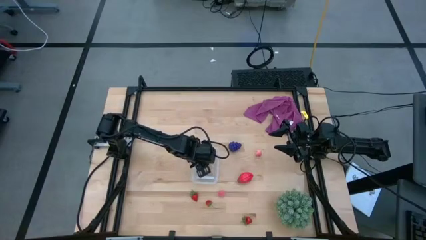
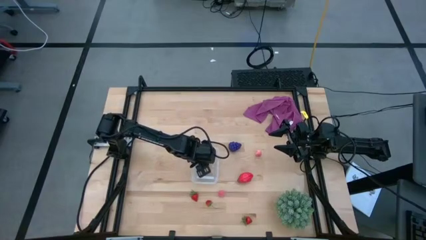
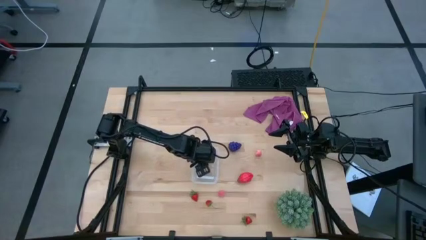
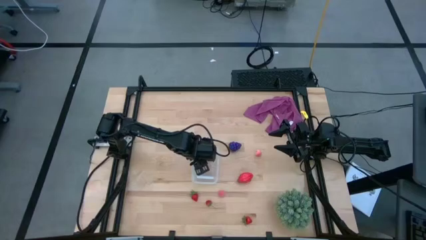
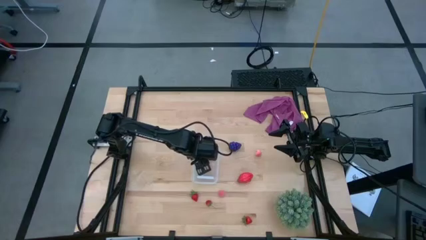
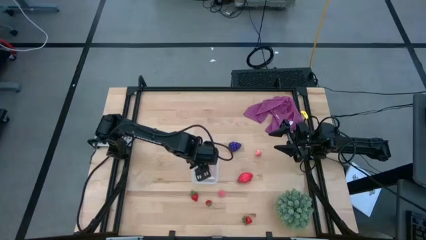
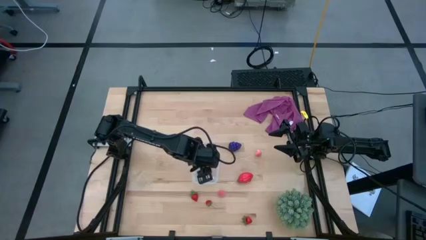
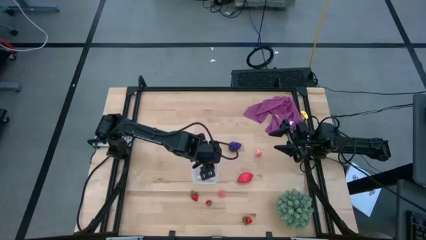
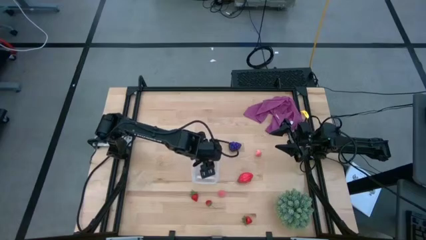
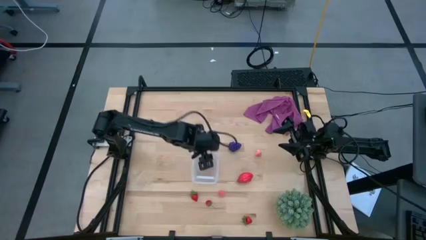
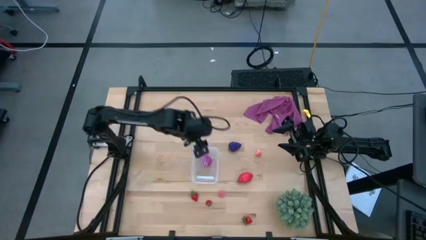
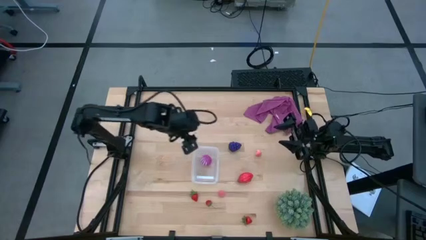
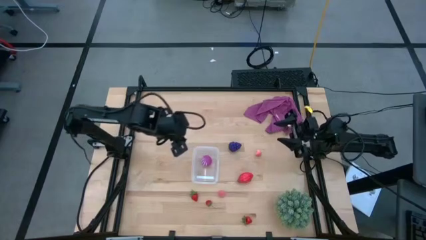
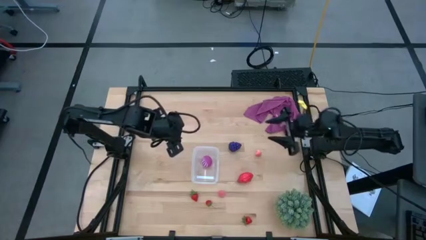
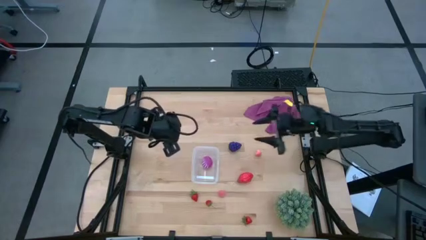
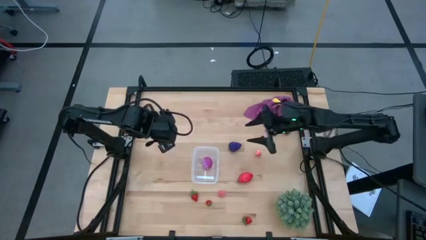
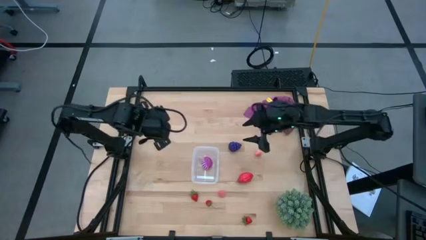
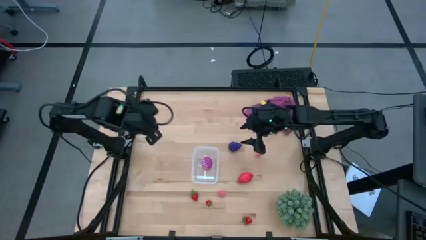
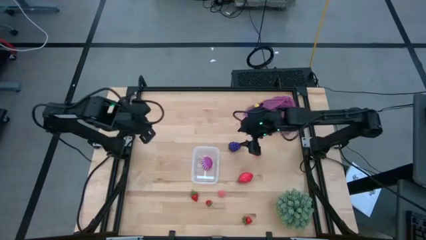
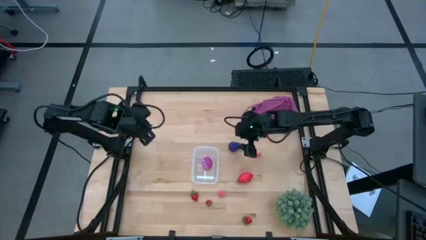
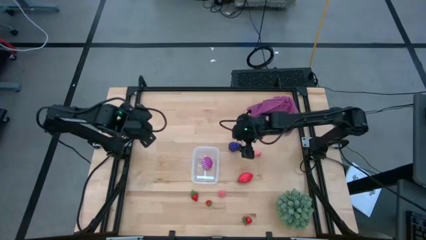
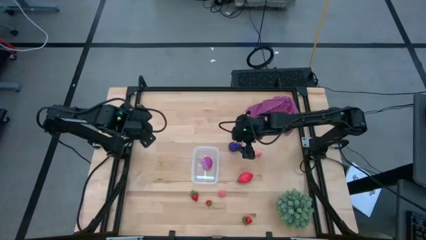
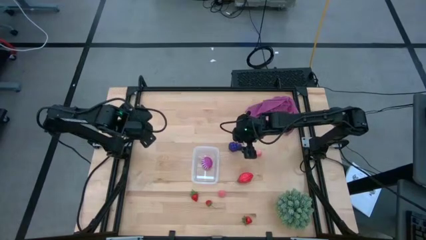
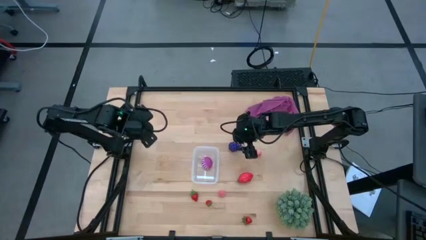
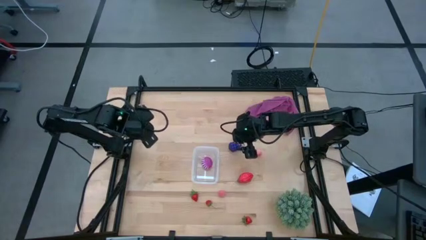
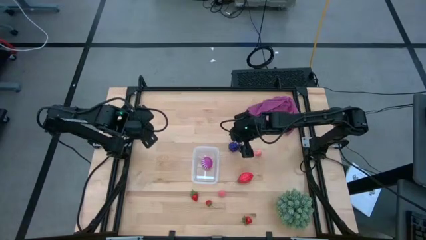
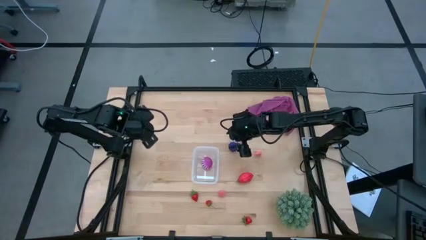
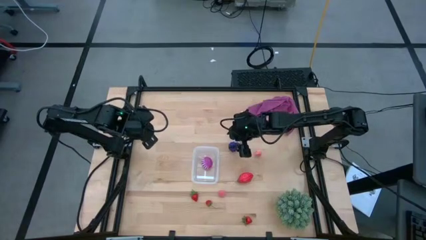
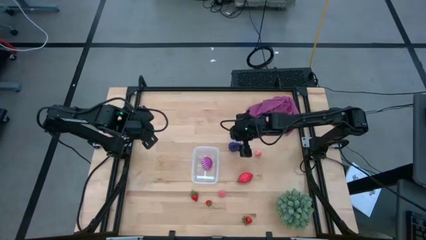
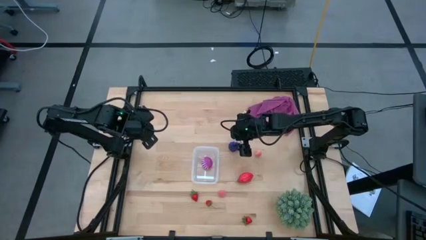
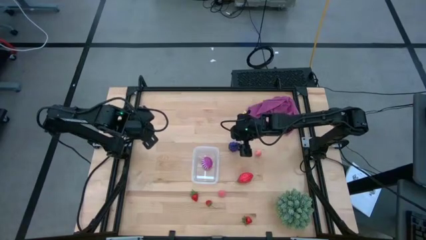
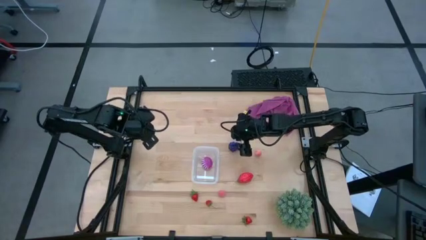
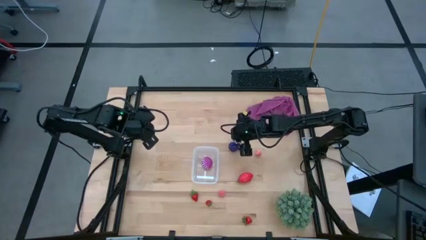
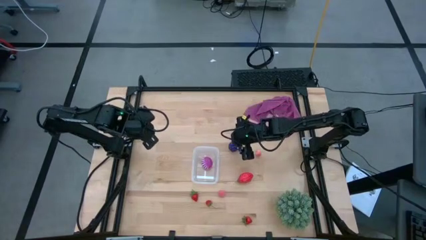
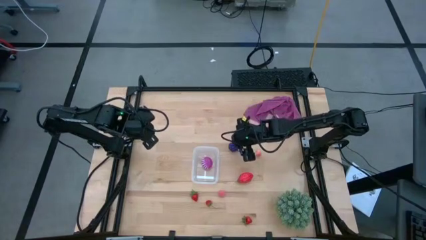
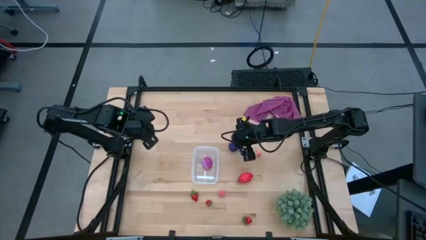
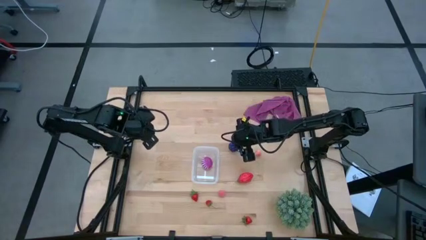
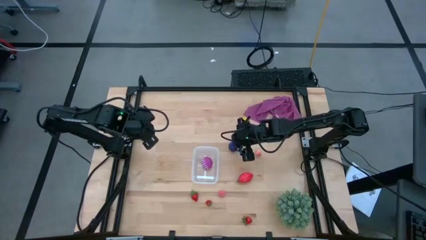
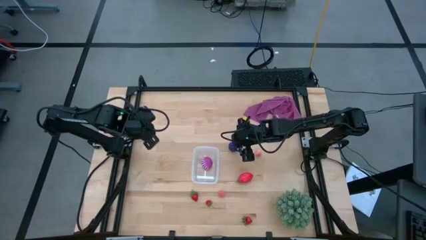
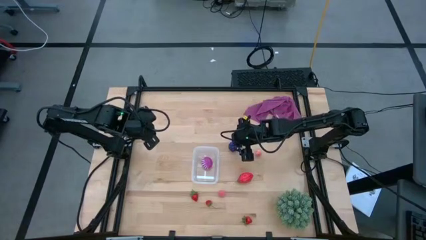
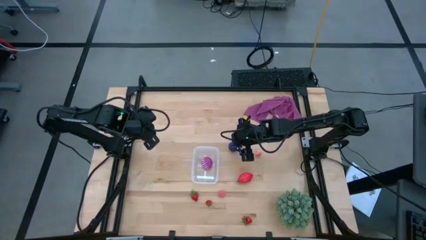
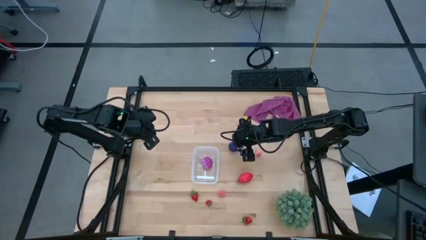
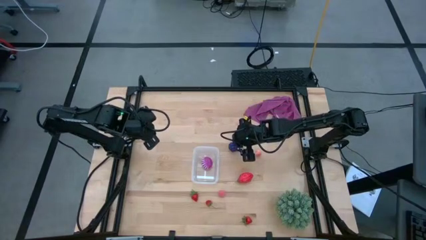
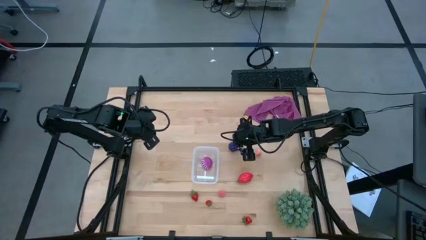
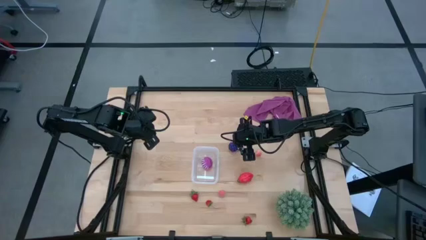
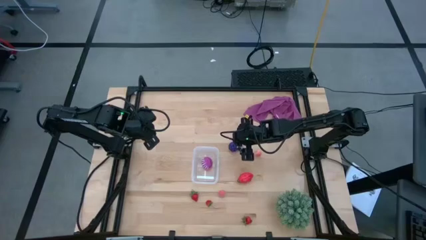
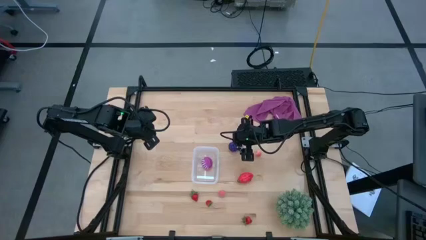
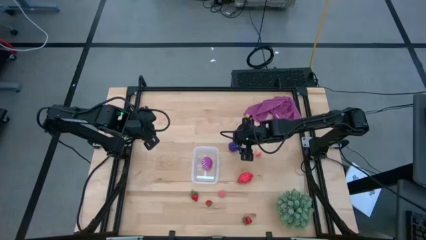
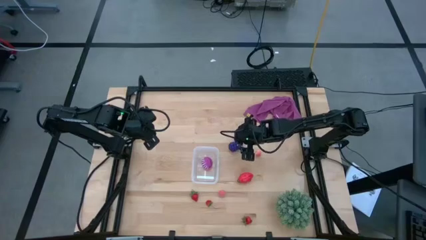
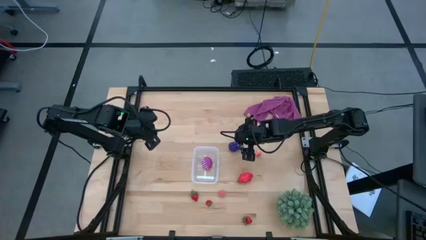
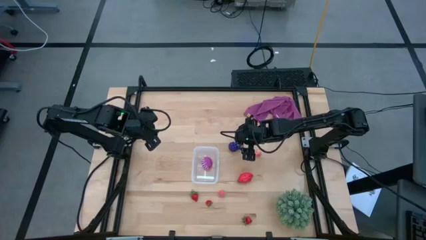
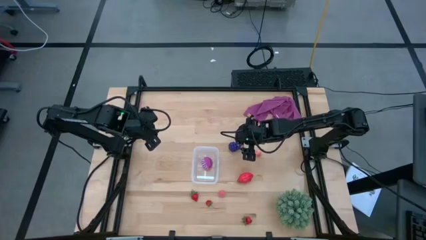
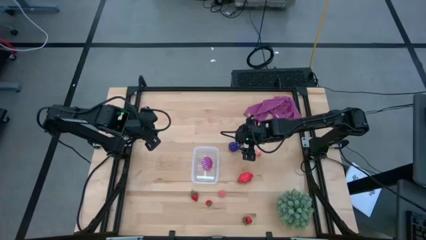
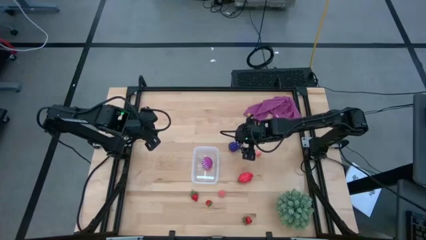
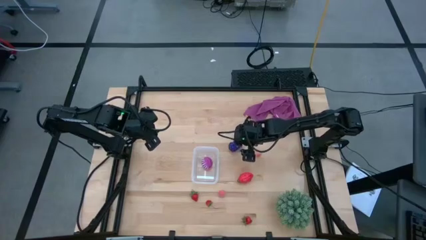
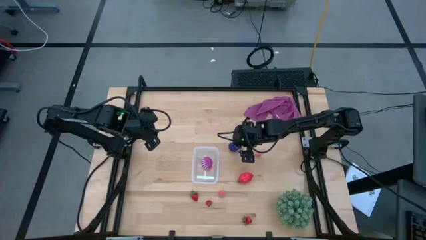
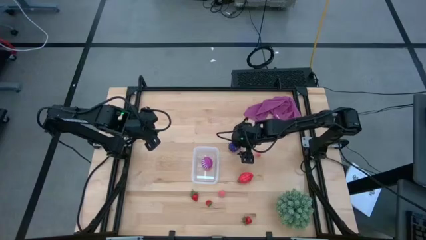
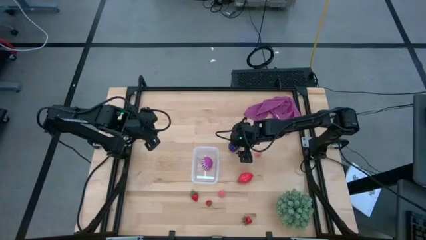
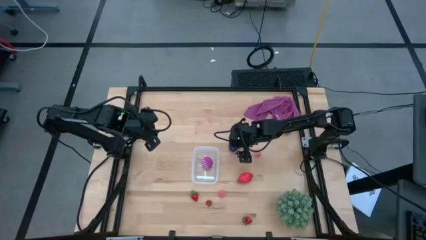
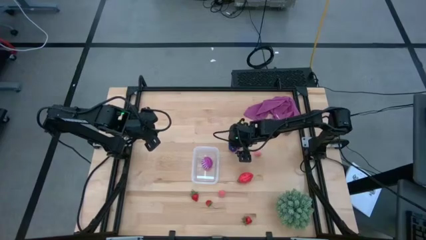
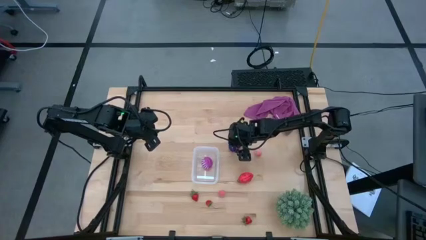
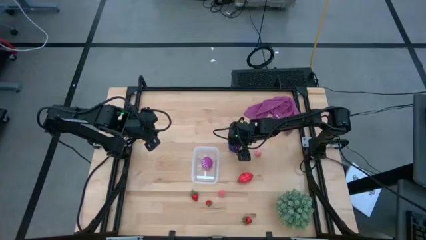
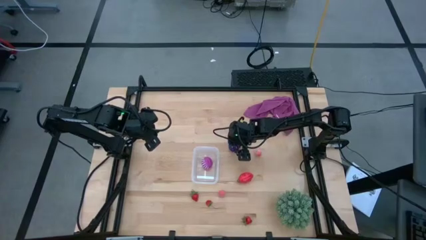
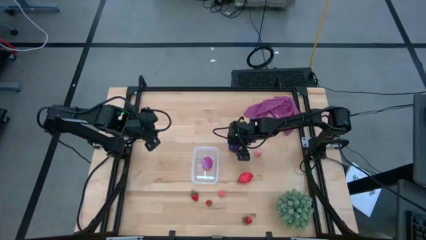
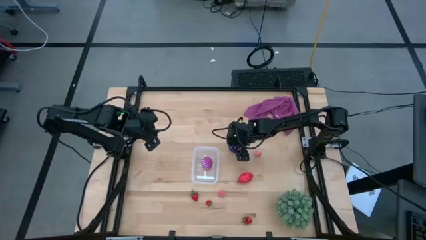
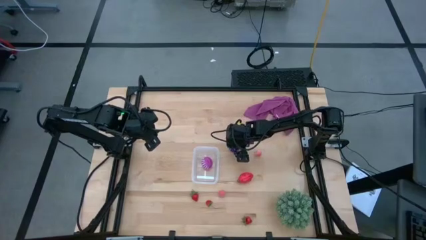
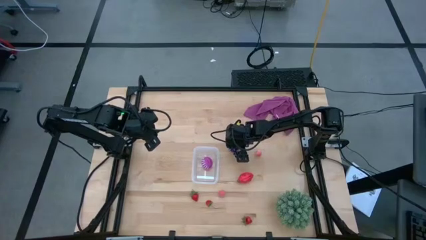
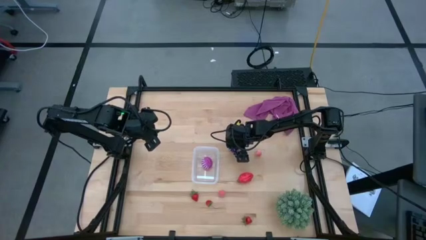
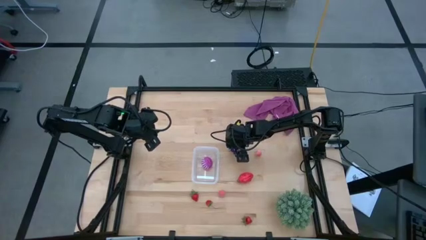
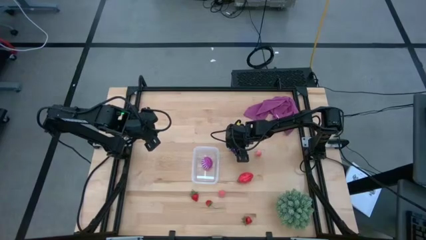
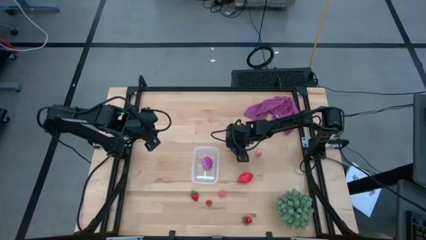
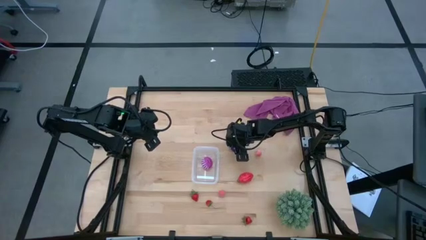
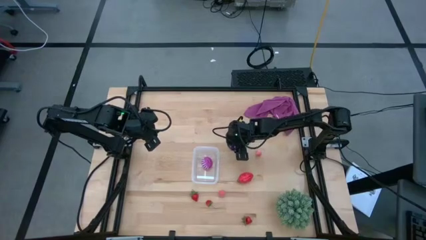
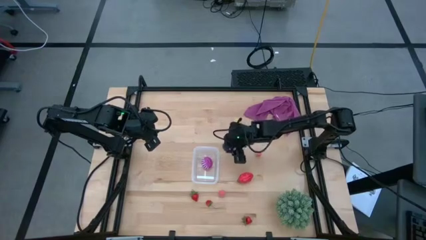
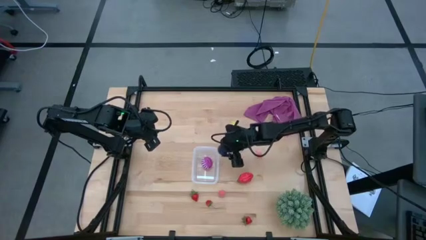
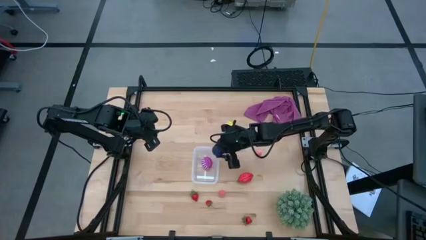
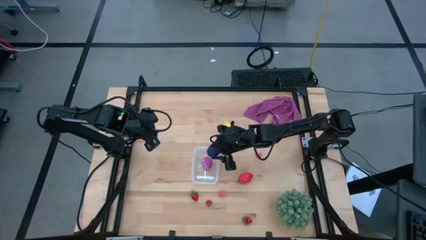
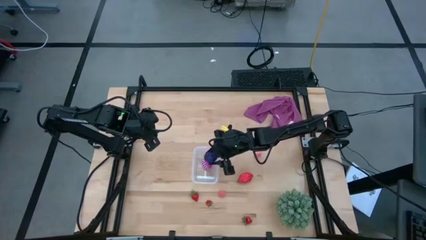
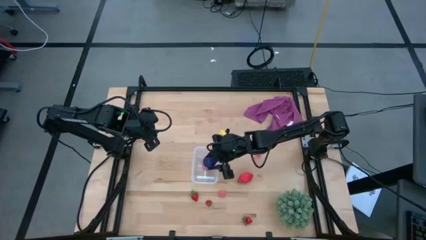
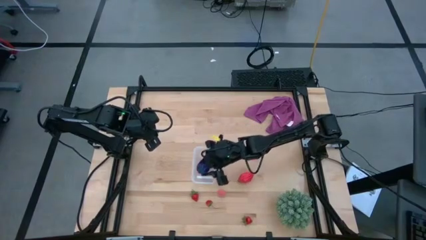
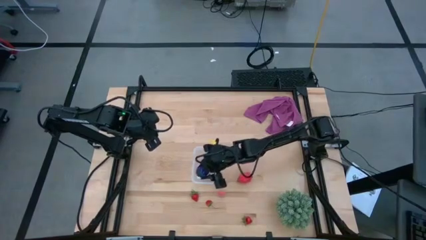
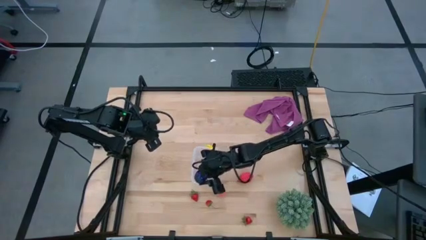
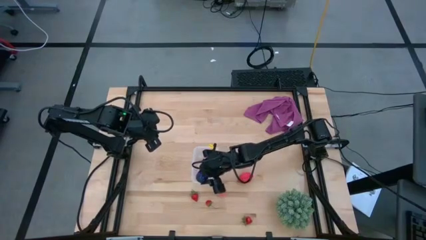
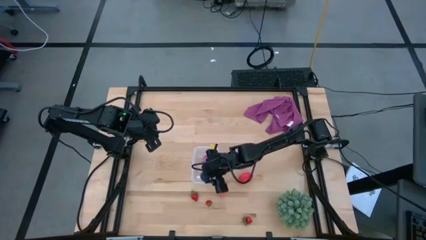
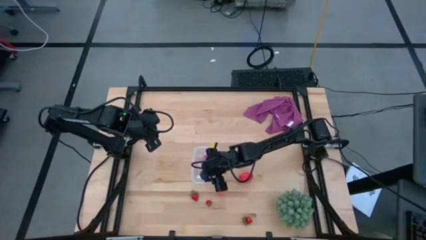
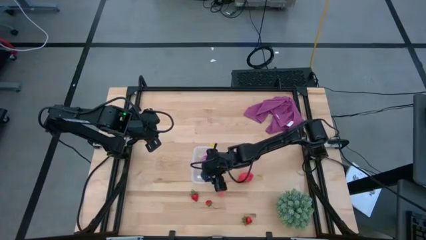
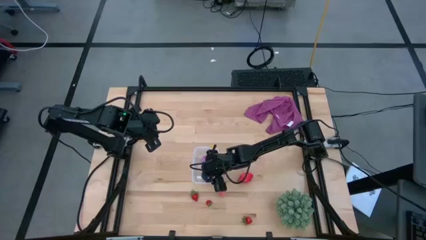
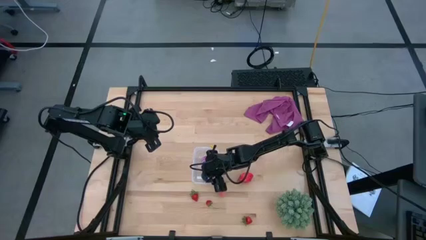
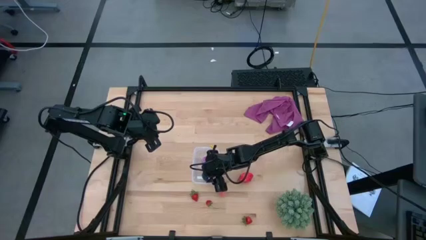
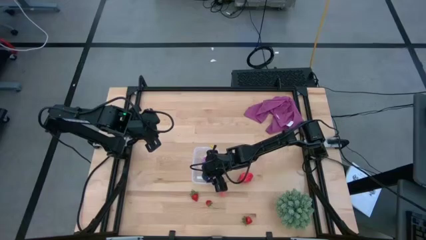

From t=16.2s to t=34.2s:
Task: Pick and placing Produce into tupperware
Put the purple grapes into the transparent bin
